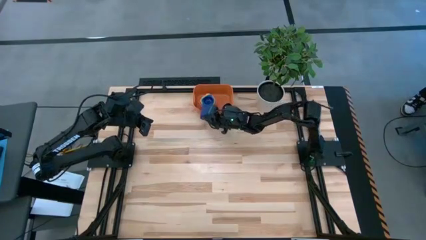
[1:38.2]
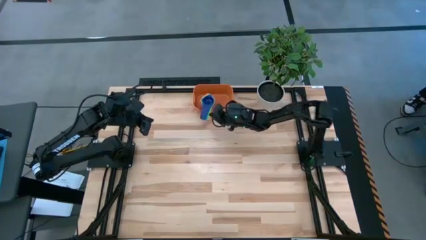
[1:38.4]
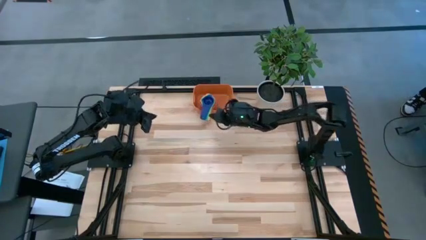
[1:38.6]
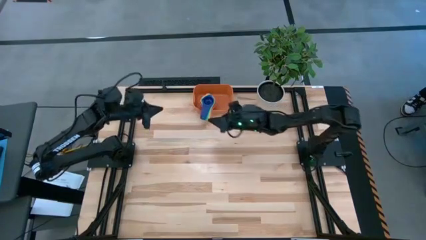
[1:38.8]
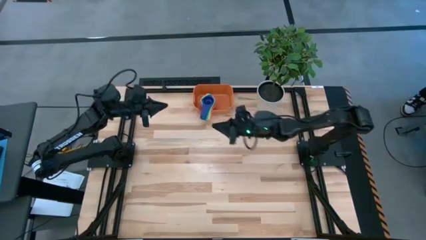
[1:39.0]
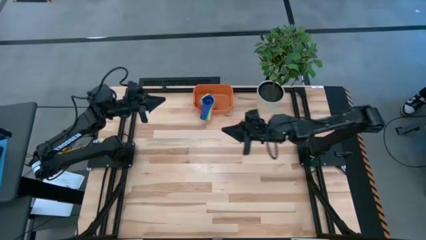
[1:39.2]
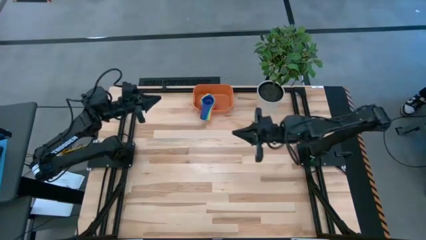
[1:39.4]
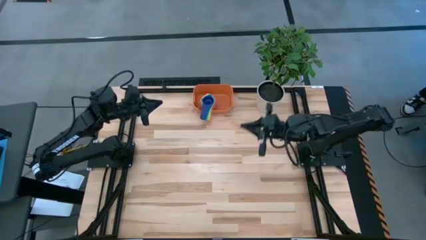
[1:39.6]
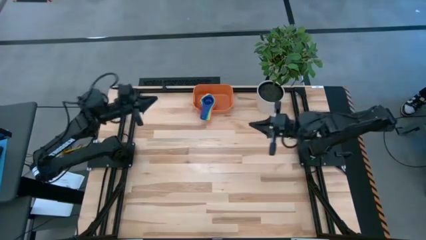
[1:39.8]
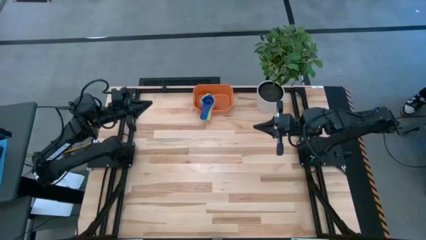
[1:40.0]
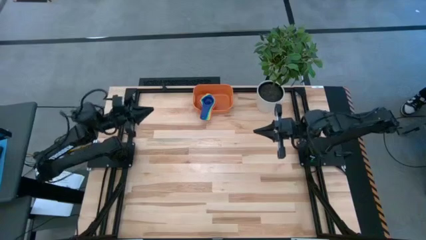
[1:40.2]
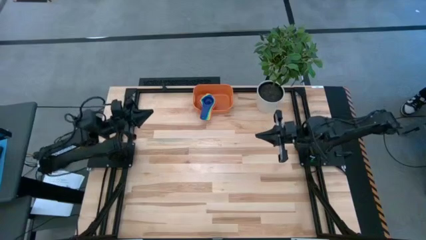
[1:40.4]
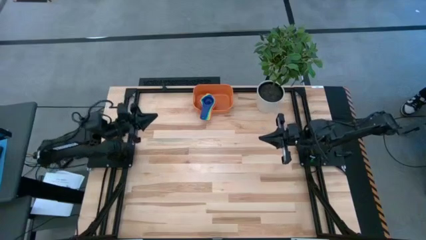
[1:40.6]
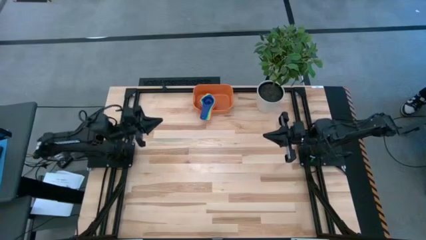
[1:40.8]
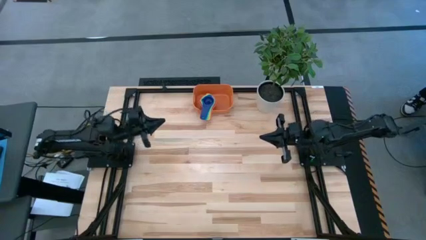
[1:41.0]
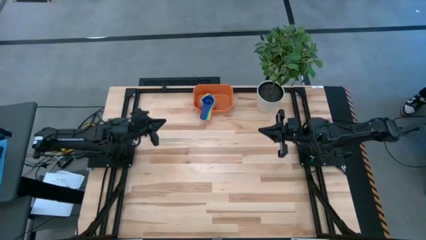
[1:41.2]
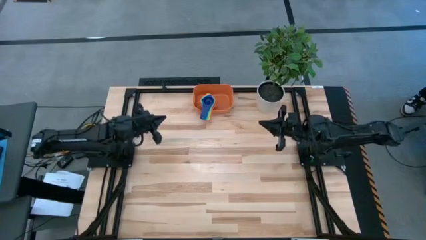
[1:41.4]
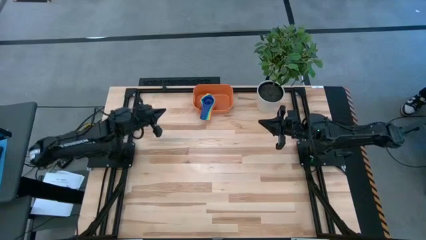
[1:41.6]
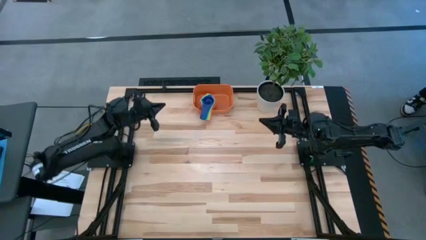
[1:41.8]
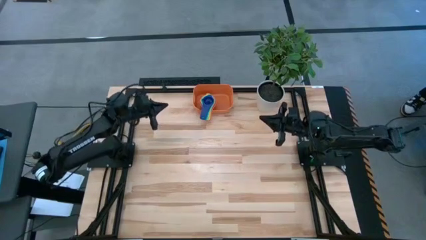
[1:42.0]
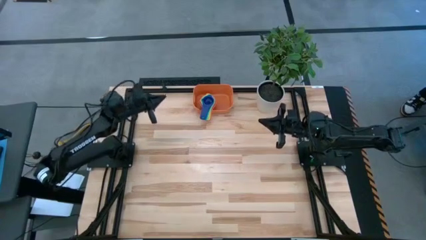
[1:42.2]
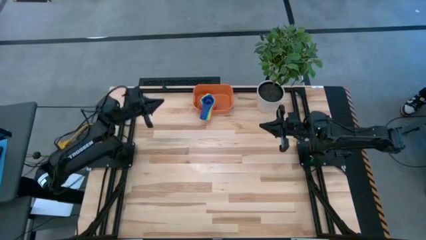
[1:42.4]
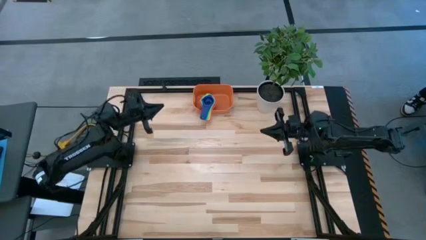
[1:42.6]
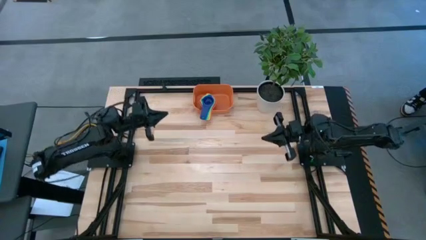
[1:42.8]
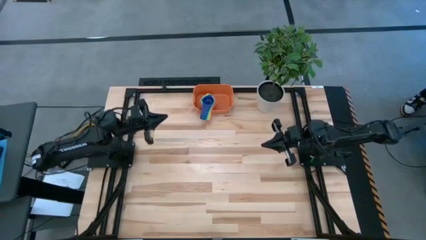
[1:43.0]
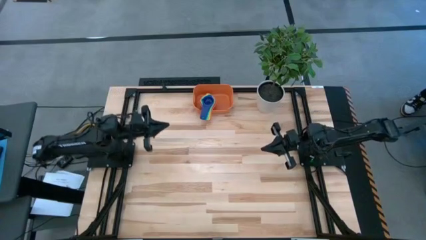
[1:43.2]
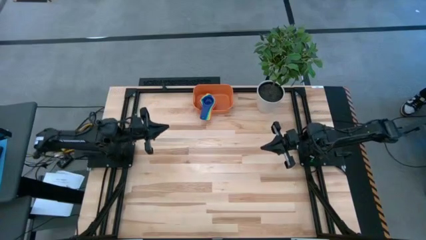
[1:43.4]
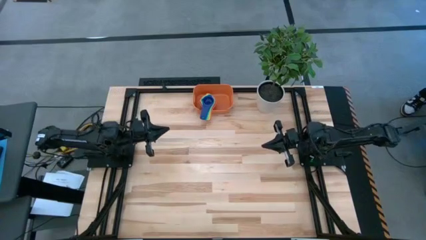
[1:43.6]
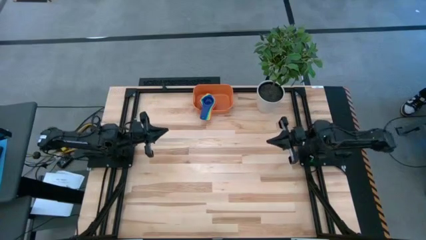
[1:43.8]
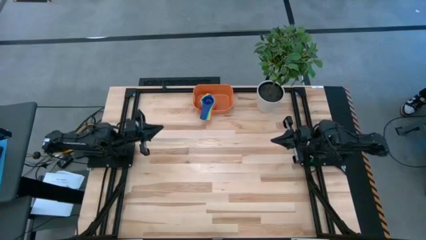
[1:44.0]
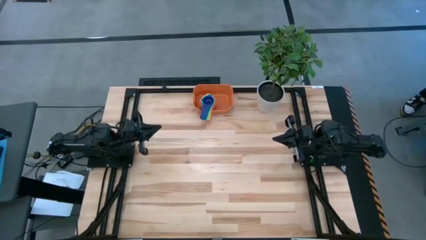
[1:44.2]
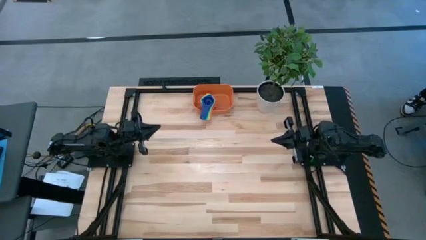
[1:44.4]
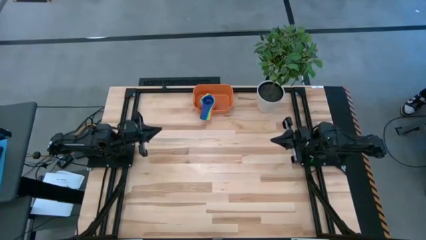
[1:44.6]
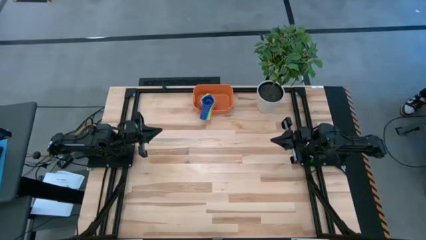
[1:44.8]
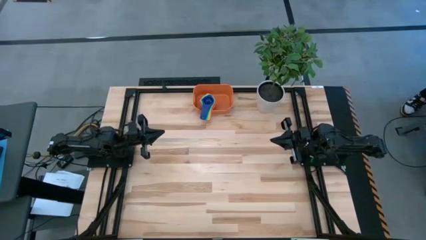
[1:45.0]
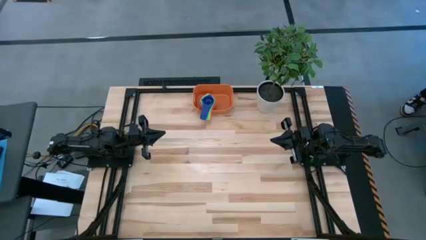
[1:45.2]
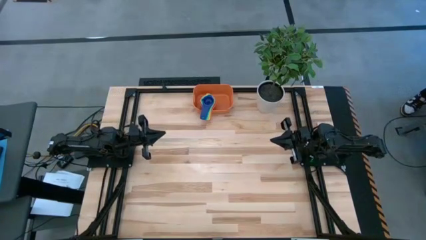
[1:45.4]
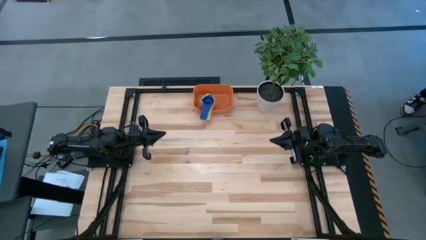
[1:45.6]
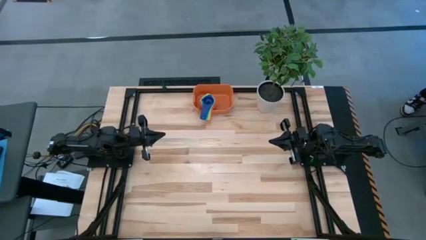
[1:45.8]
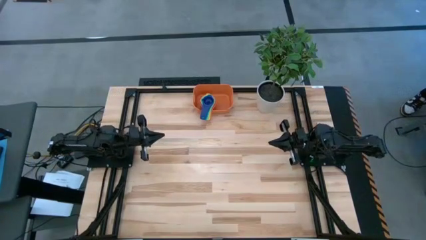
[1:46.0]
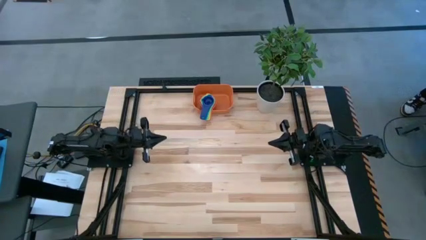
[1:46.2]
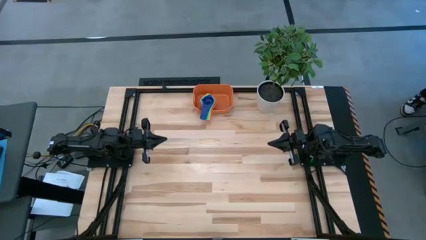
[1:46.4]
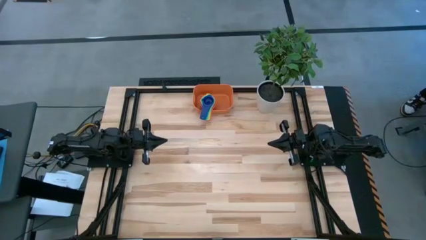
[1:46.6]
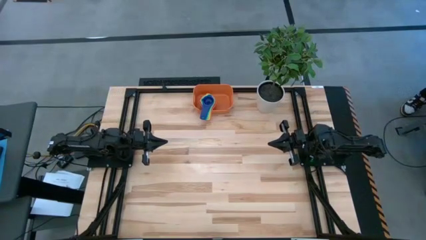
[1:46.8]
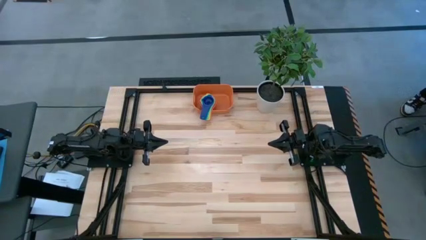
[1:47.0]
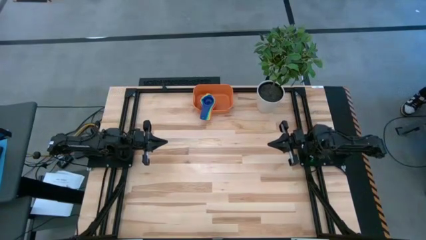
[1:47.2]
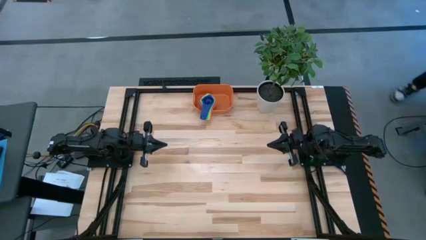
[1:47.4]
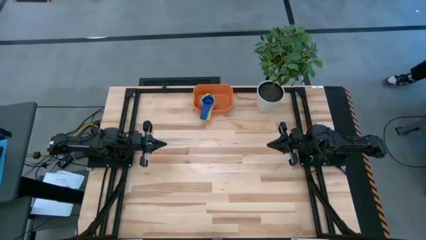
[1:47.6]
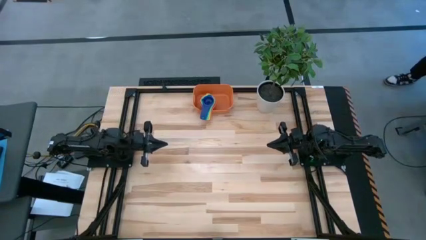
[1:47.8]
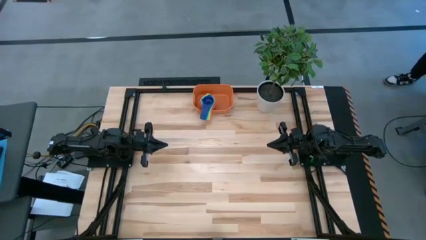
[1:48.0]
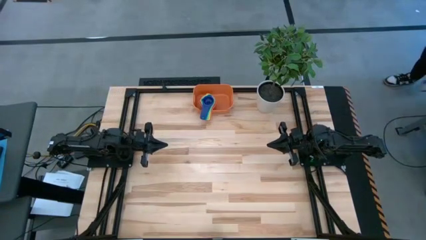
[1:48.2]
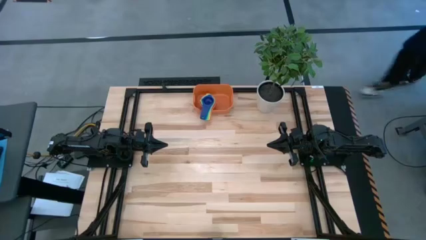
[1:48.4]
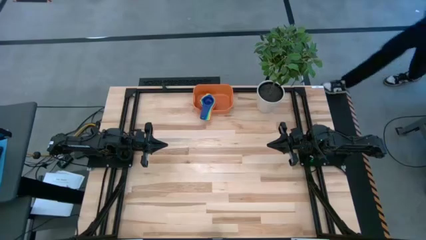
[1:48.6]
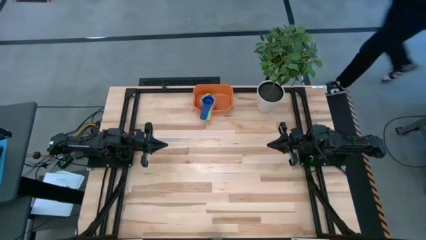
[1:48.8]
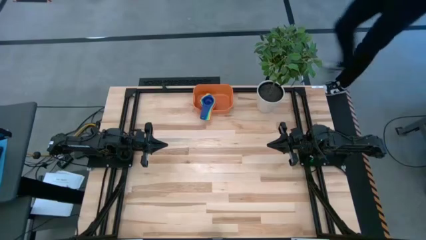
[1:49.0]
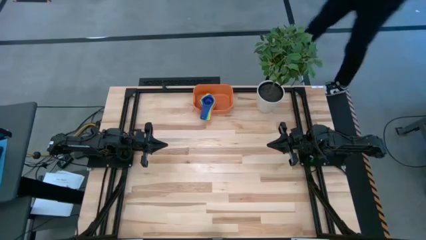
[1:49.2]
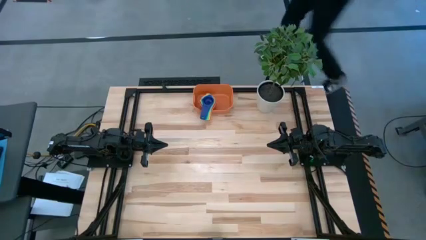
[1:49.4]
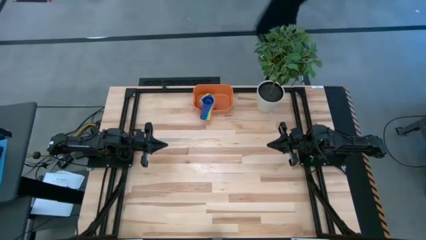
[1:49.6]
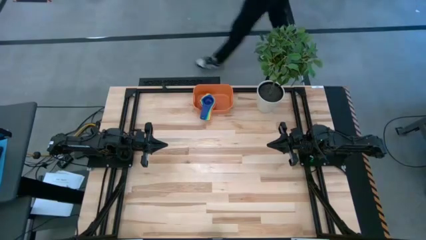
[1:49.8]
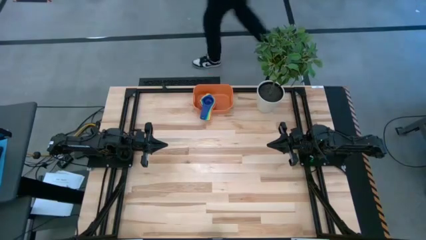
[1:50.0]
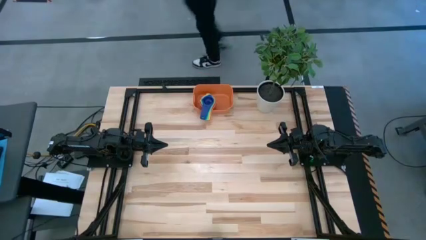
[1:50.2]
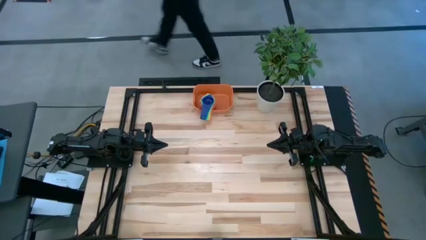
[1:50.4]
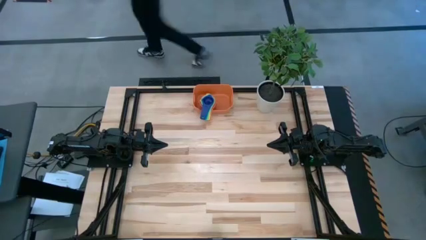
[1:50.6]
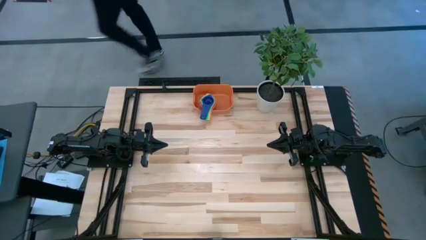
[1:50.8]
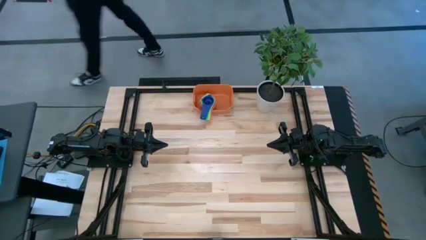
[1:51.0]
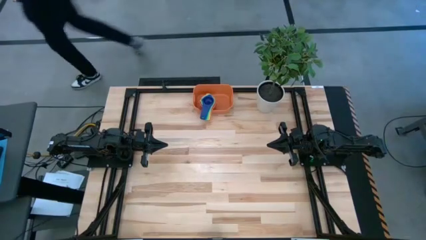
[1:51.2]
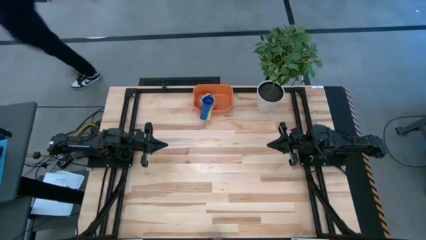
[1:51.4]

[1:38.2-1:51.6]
Task: Nest measuring cups in basket
Return to Home Position

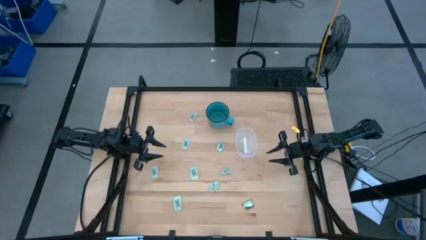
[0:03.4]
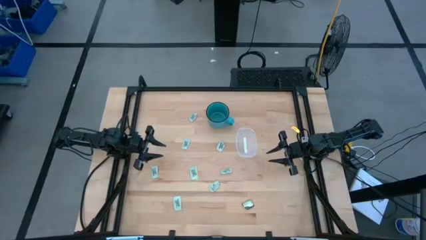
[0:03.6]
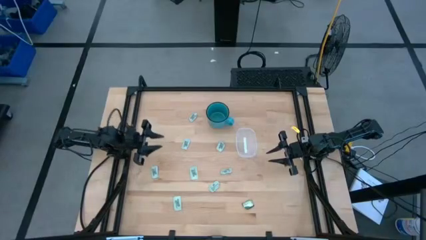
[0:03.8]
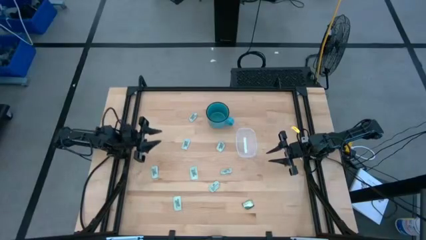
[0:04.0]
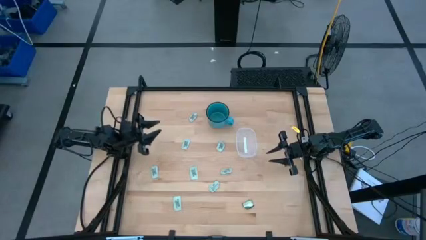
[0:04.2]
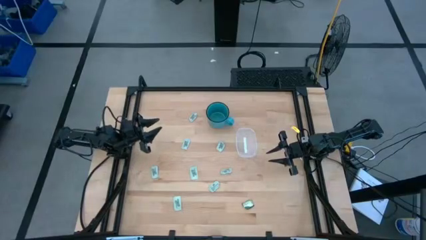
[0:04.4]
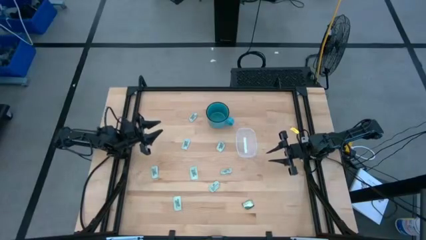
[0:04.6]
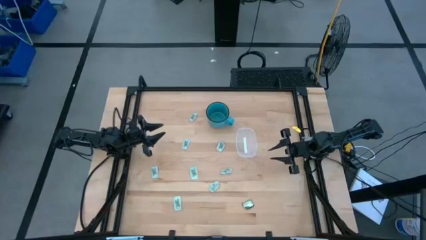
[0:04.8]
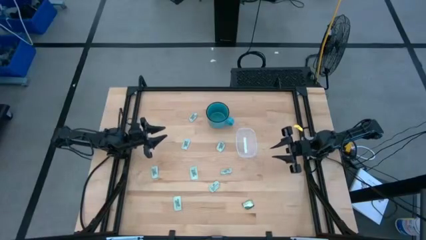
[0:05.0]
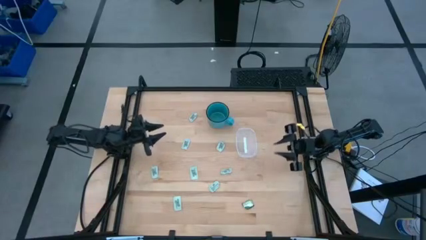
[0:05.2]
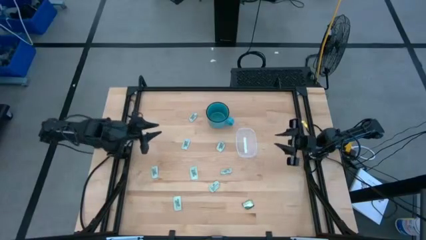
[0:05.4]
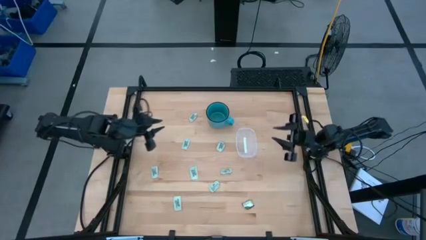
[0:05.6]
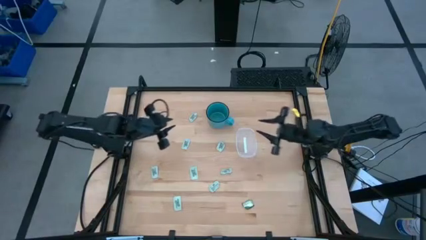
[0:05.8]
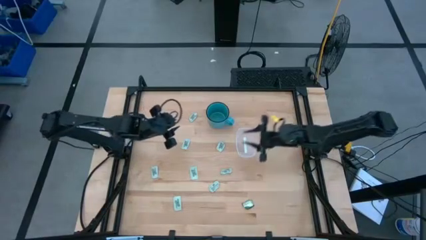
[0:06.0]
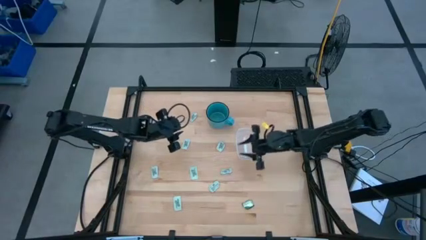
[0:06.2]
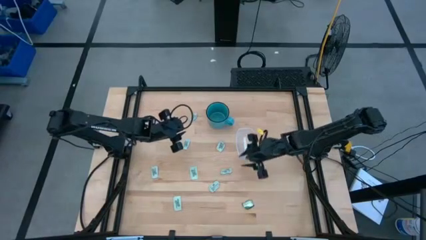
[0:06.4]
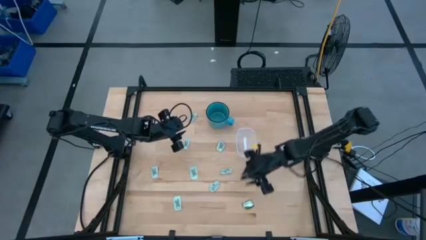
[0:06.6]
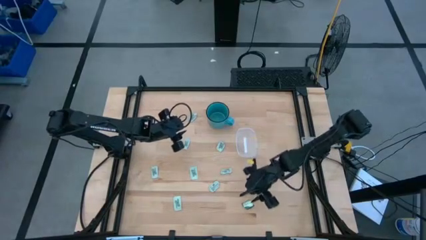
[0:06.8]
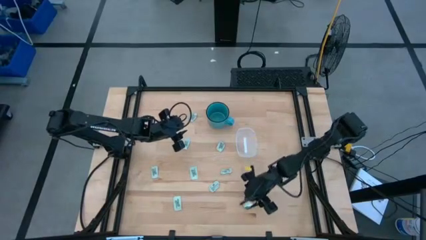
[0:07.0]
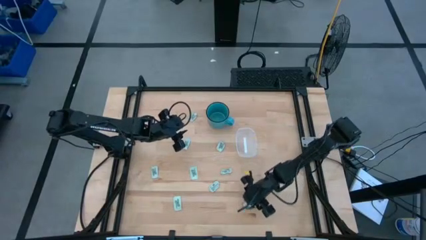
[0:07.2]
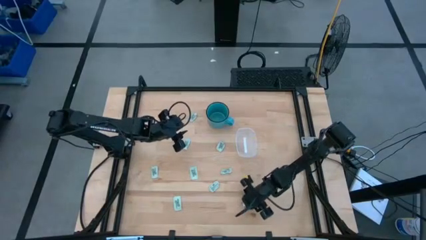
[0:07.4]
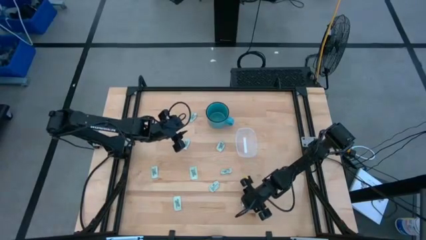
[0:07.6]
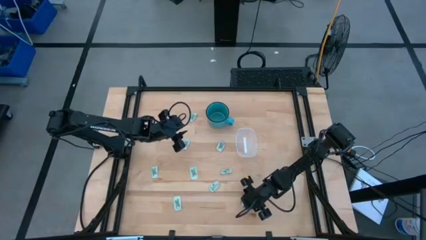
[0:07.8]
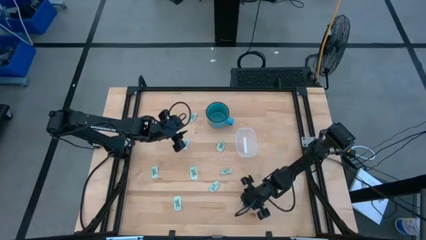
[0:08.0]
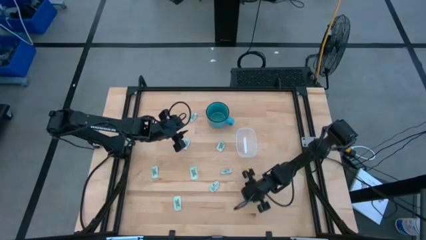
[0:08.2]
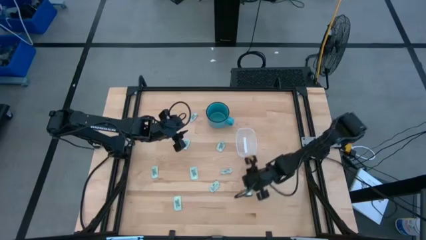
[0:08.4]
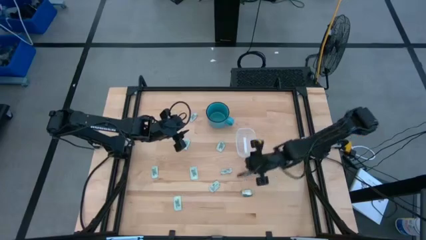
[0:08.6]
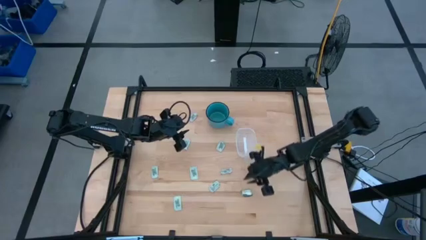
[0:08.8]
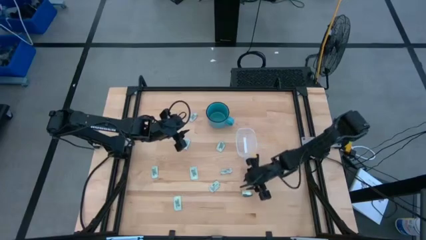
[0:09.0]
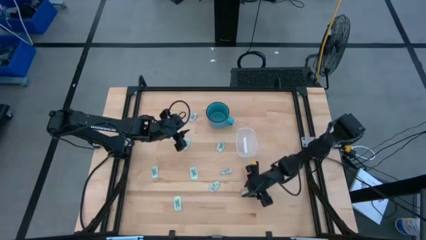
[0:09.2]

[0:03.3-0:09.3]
Task: Pick and place Stevia / Truvia into bins
Put the truvia packet into the transparent bin
